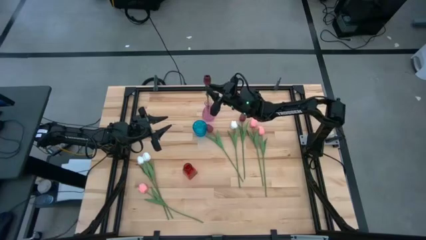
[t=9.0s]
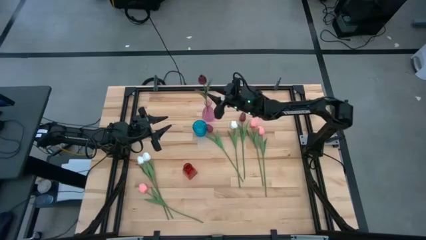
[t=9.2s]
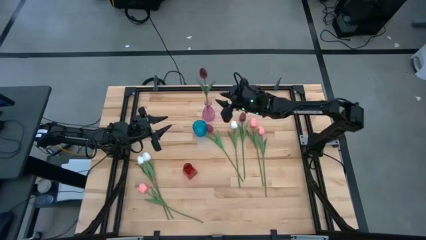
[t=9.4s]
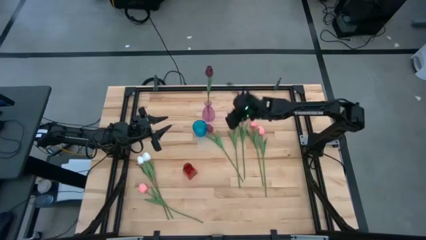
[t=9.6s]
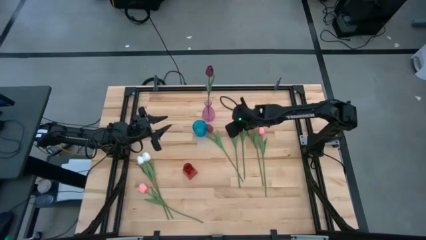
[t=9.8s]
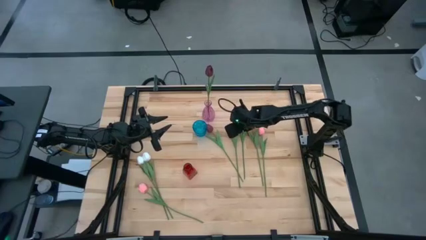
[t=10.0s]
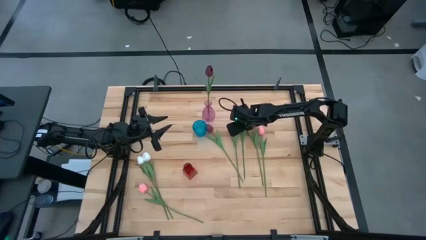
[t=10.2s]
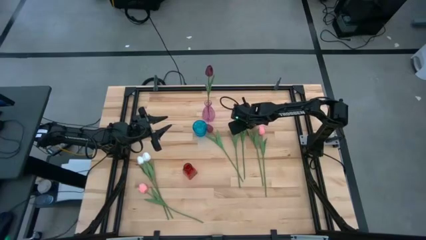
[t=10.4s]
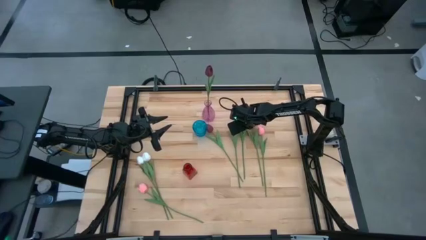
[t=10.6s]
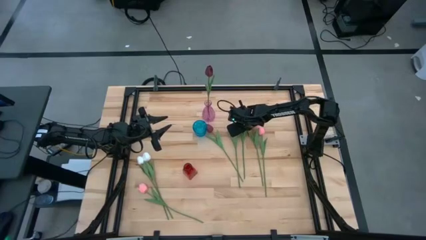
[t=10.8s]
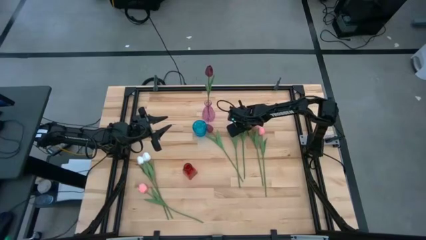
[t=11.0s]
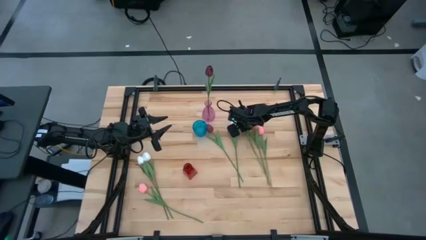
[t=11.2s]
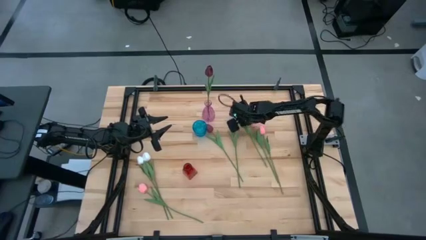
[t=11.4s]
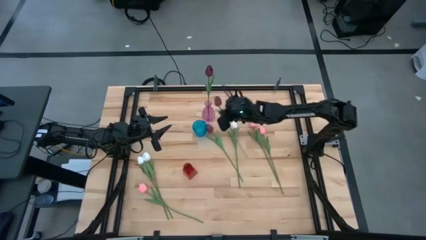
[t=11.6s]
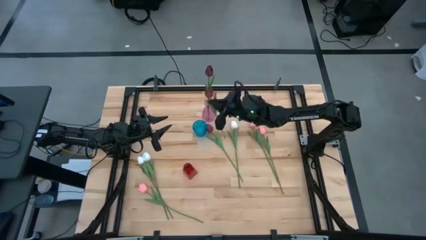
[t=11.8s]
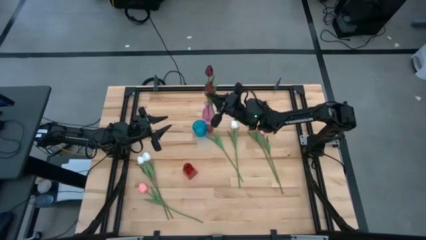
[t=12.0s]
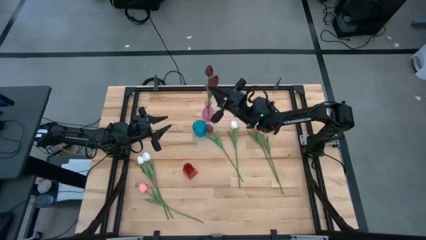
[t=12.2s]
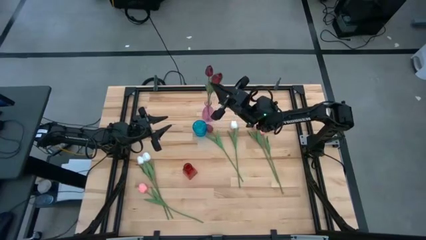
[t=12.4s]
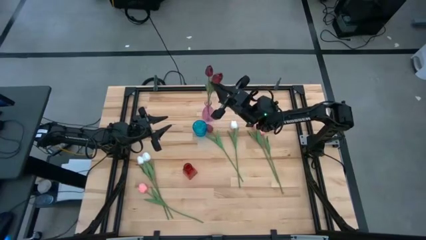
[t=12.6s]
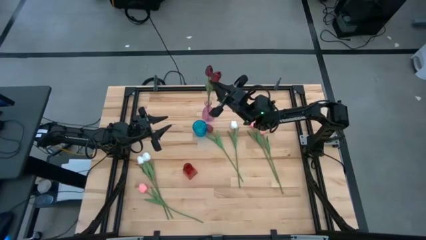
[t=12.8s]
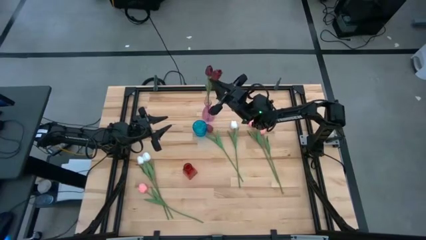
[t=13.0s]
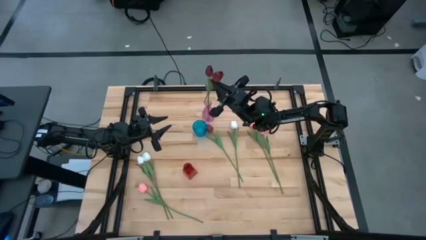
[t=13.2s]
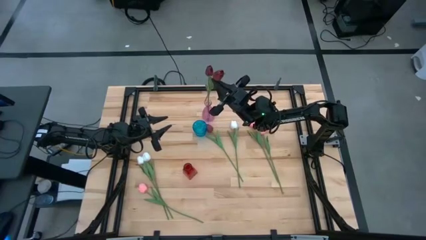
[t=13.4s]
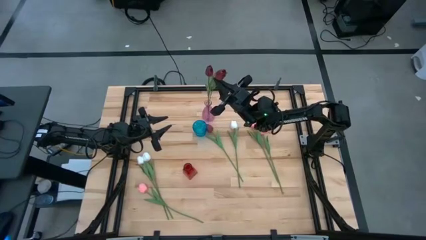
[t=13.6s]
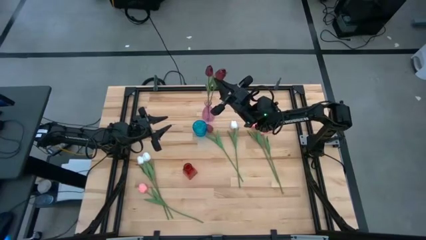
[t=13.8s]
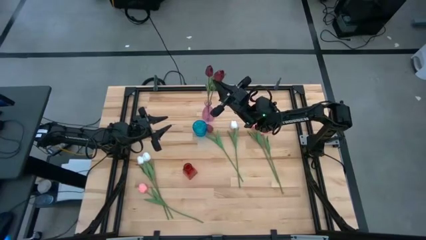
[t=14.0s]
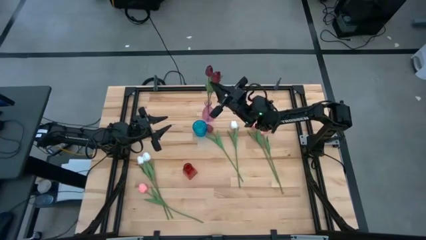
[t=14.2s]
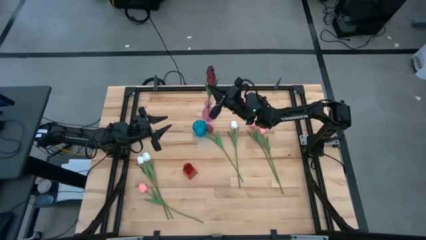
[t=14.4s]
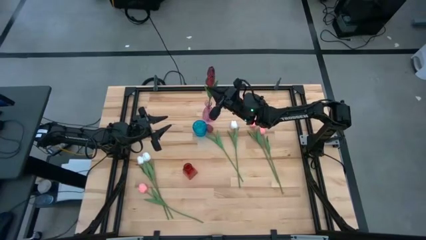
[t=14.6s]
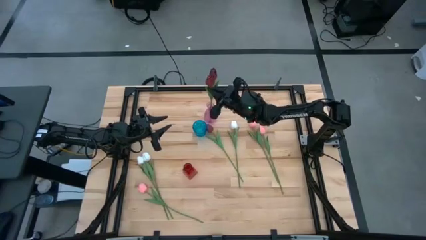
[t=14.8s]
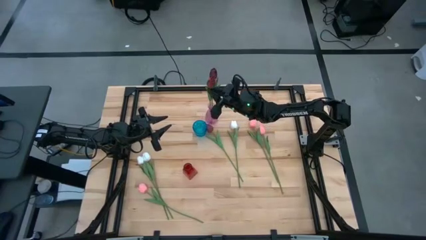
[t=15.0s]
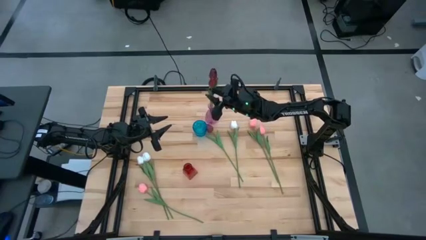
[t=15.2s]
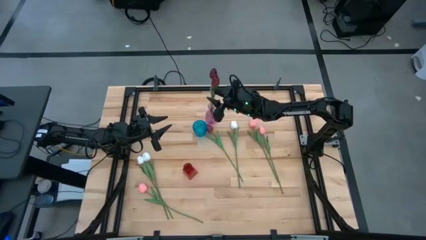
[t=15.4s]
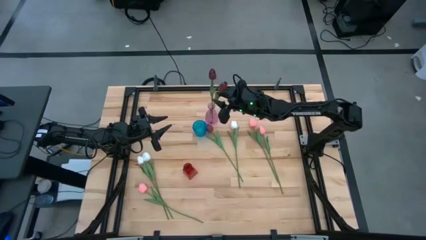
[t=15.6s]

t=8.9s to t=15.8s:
Task: Sort flowers into vase by color
Put the red flower into the pink vase

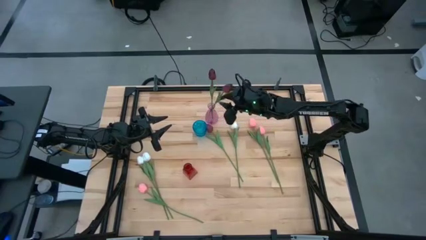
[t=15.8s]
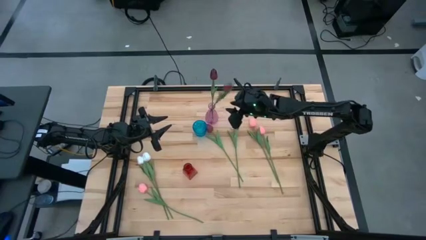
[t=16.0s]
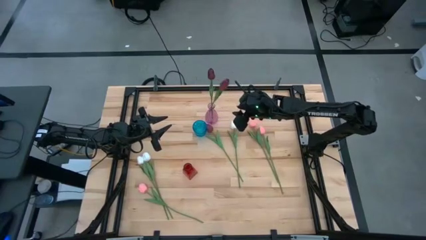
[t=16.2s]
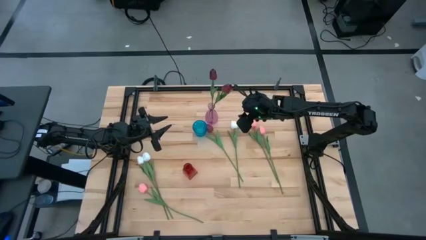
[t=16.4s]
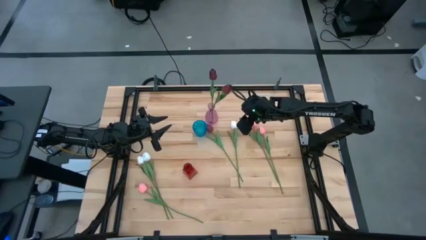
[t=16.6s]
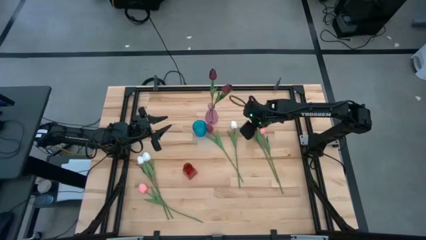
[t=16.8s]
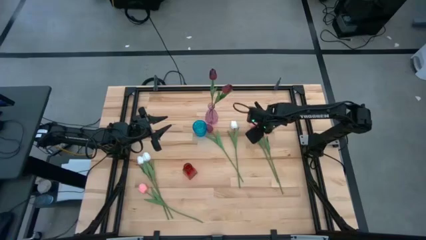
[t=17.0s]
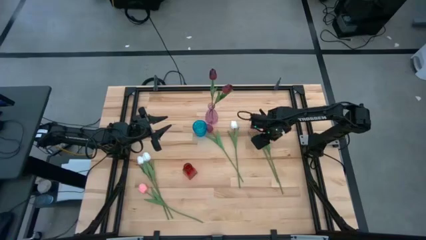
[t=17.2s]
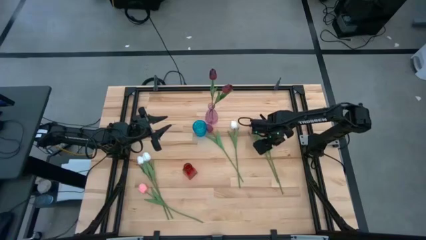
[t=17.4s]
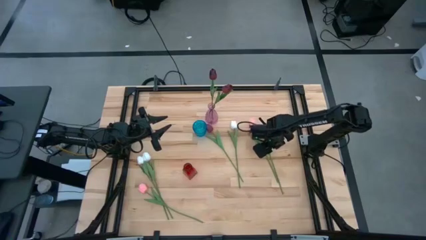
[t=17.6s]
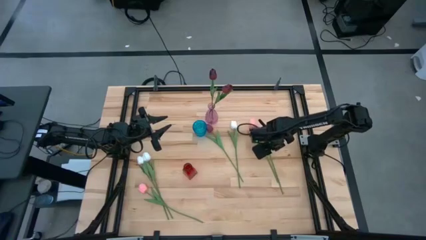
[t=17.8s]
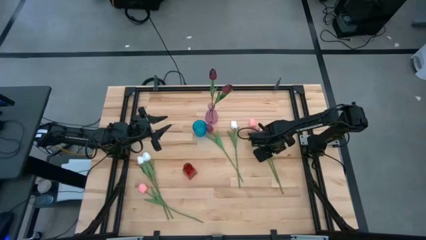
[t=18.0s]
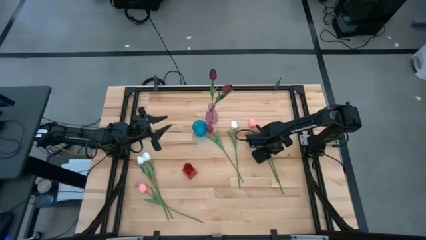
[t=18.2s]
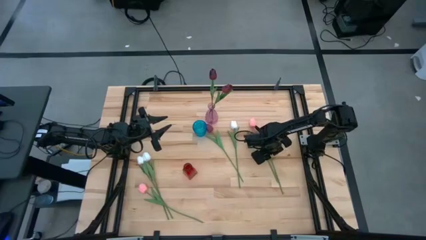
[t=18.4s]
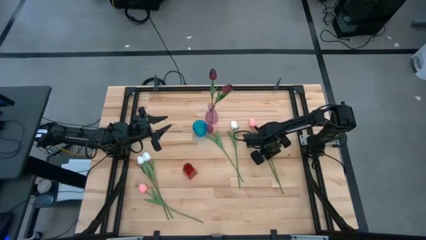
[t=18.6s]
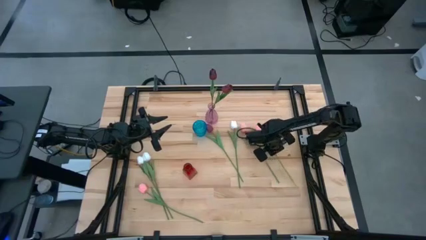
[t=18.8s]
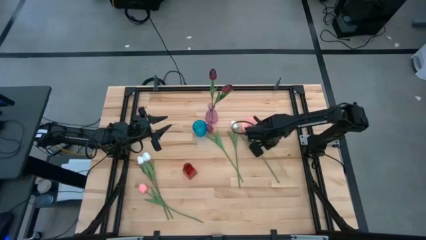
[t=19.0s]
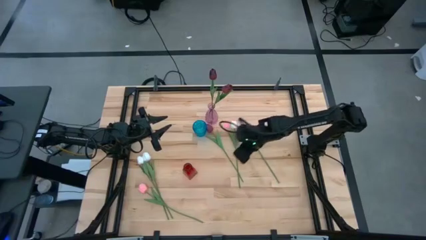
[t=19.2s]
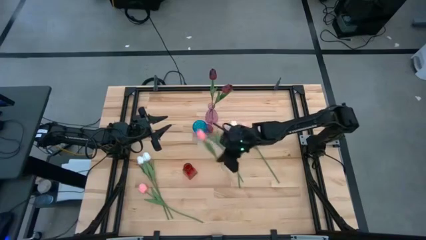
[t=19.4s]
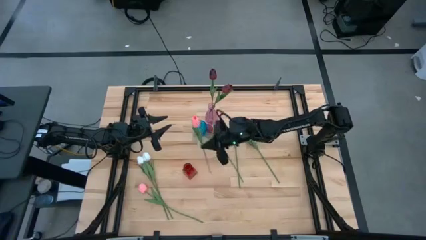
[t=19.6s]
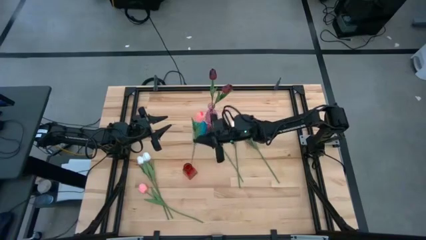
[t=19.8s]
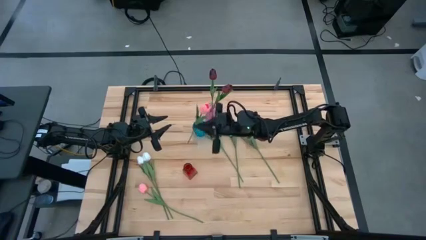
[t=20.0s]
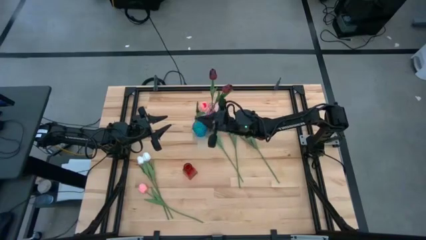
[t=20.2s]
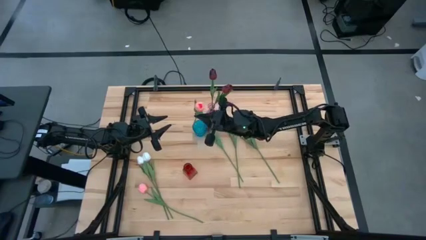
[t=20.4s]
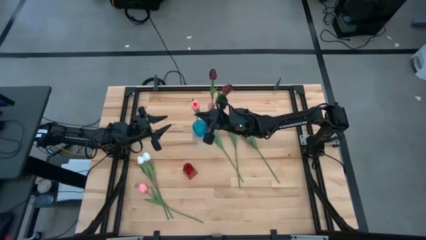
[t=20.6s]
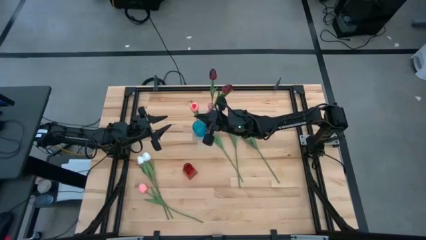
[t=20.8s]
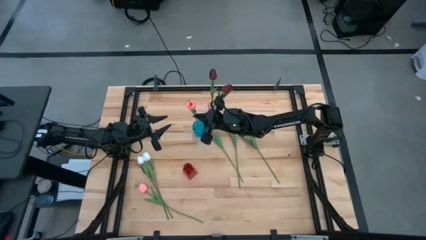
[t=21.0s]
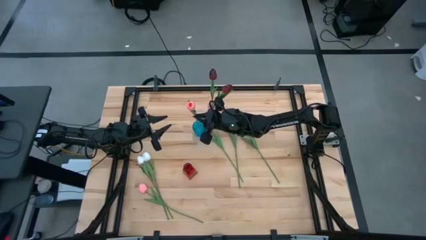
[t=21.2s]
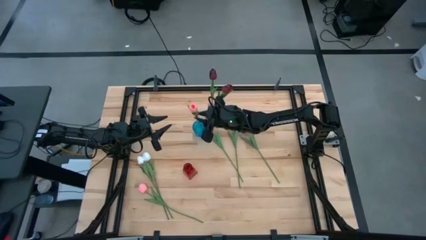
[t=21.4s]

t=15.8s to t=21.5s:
Put the pink flower into the blue vase

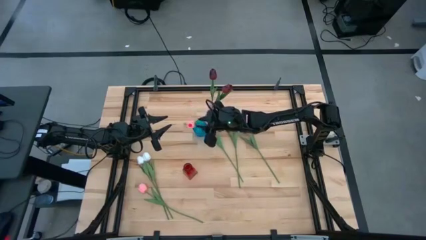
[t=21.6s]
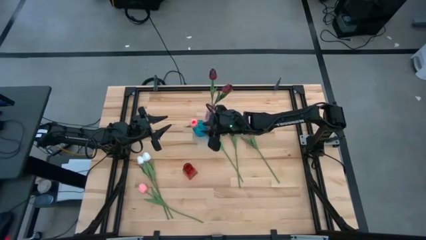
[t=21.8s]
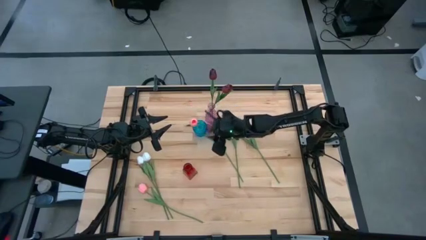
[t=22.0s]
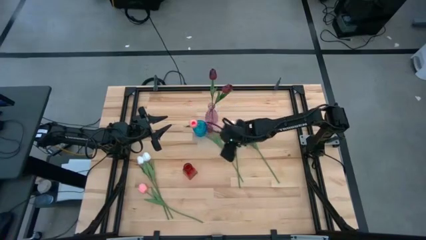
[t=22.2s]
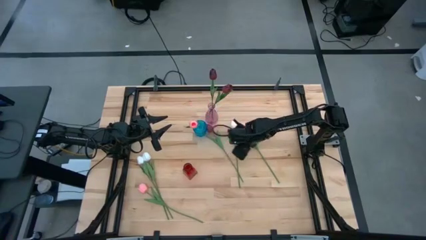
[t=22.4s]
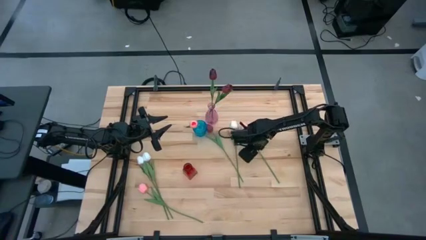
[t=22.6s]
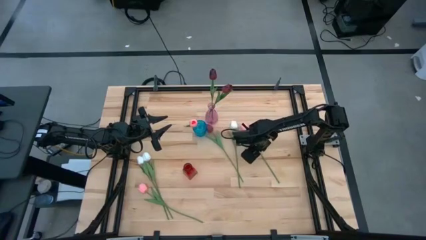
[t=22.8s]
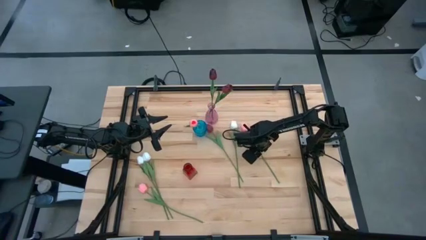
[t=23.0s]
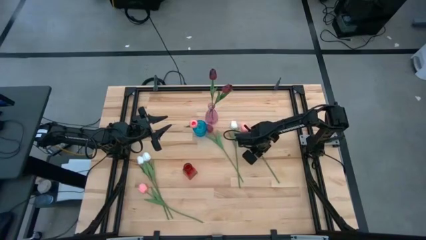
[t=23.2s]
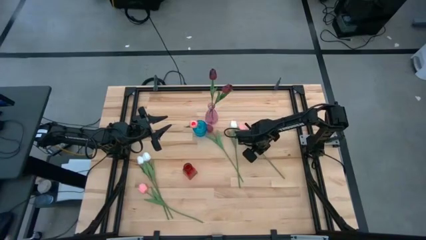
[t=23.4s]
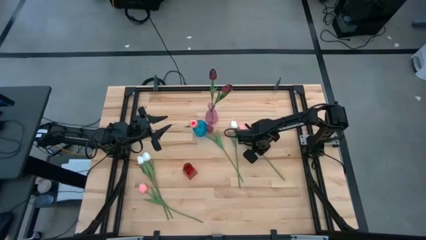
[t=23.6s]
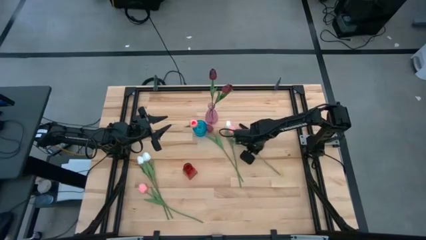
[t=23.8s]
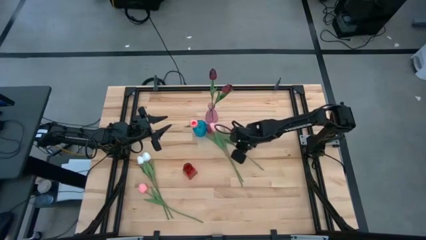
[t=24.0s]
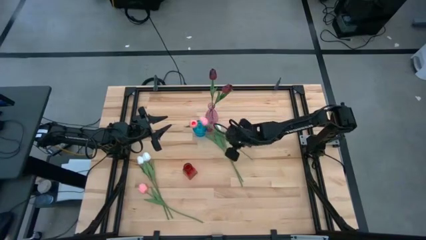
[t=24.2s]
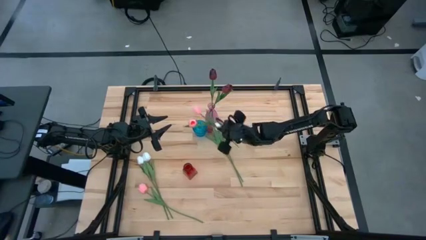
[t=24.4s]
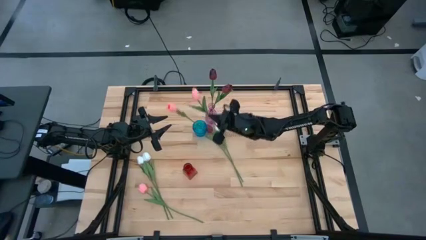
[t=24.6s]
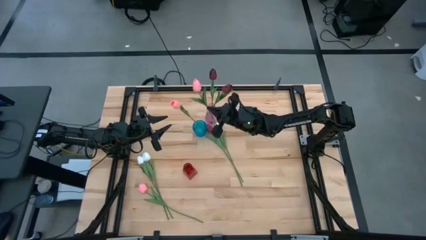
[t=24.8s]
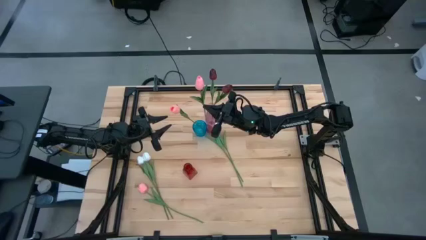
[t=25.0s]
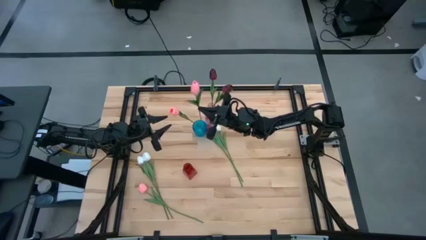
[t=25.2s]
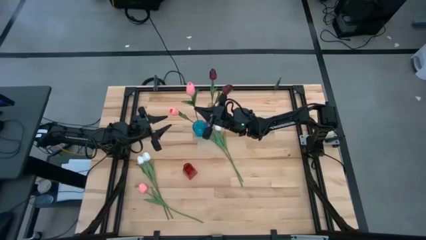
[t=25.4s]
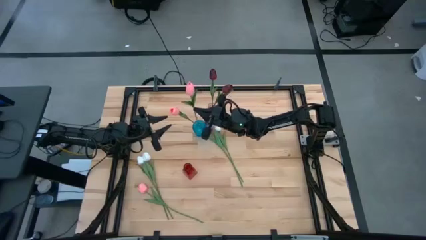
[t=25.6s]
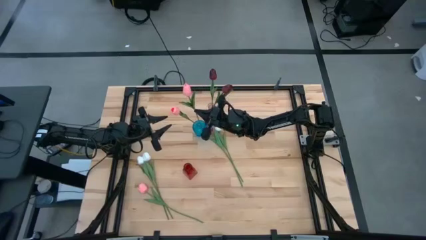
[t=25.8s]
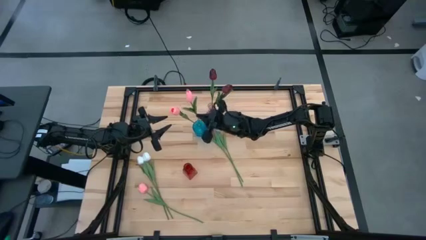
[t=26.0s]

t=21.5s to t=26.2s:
Put the pink flower into the blue vase

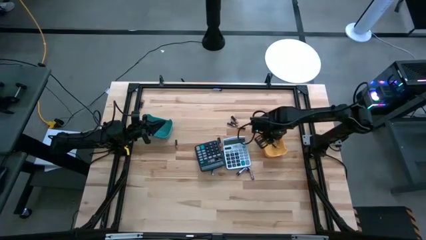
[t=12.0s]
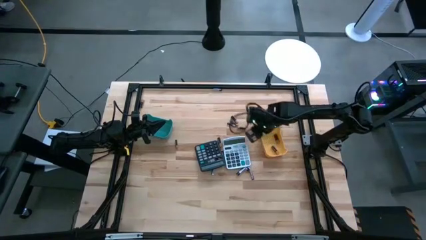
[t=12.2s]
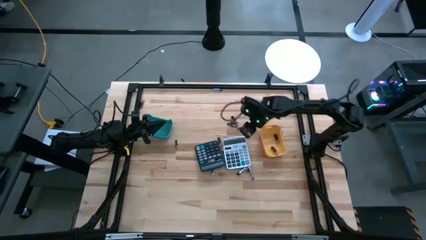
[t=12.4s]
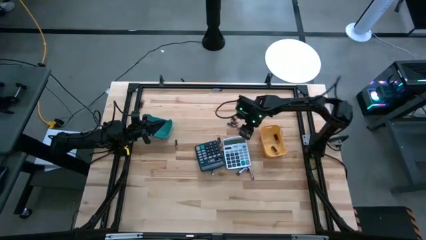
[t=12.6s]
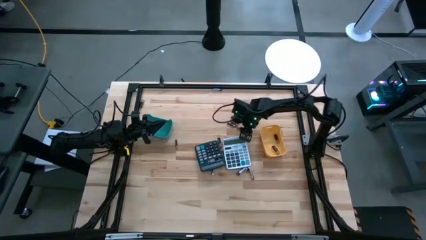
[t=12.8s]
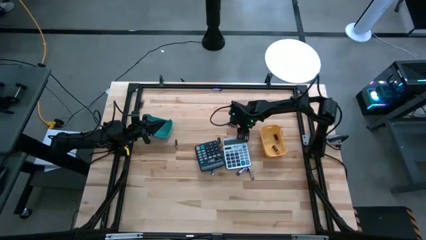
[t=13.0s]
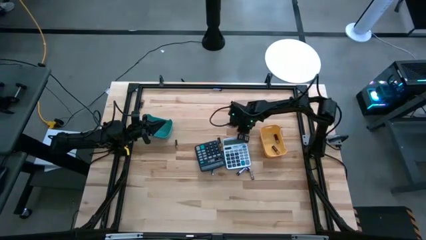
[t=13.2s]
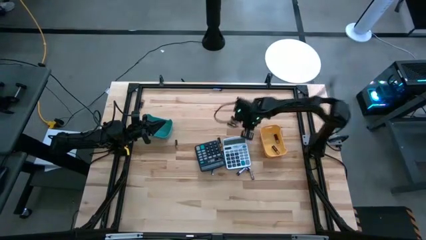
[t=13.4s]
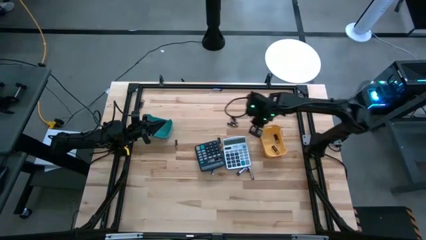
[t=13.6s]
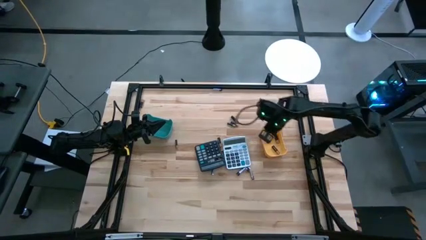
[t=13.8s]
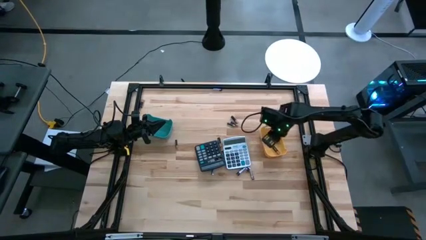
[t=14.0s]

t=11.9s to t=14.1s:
Task: Sort batteries
Put the black battery into the yellow bin
